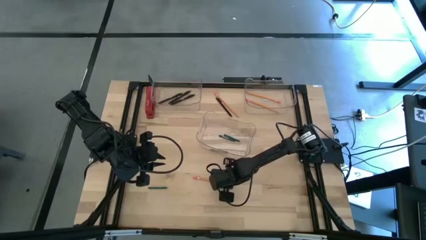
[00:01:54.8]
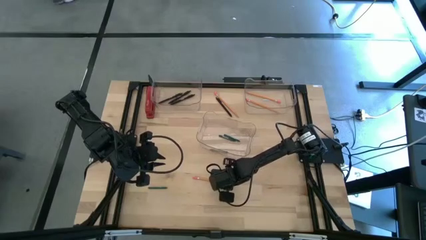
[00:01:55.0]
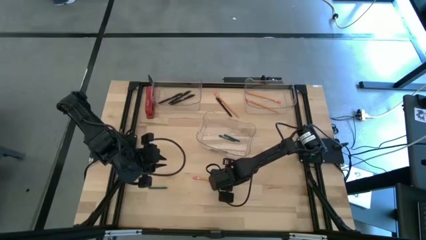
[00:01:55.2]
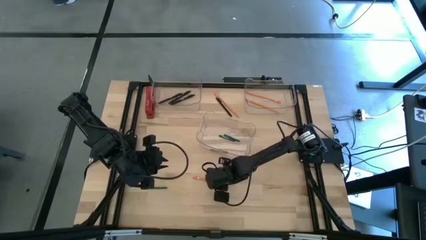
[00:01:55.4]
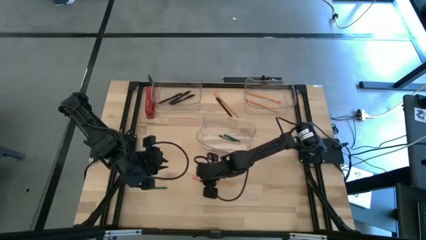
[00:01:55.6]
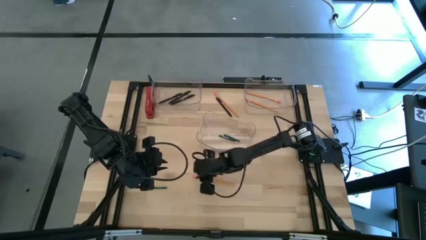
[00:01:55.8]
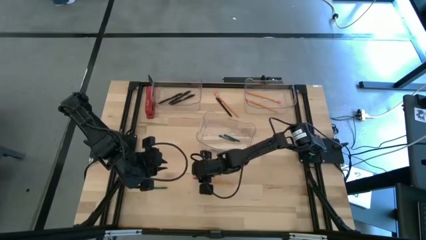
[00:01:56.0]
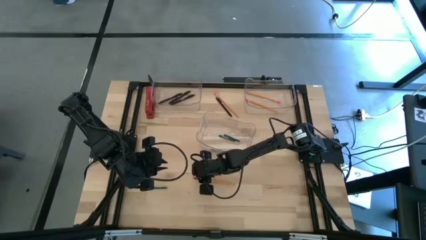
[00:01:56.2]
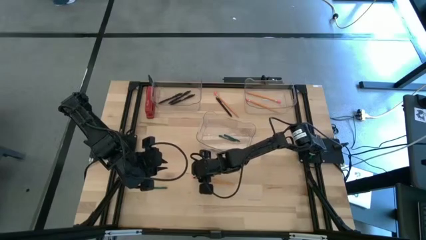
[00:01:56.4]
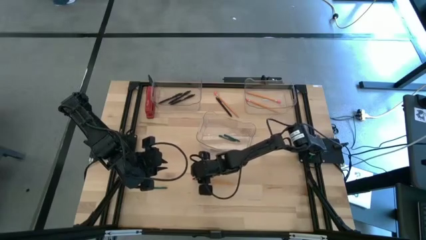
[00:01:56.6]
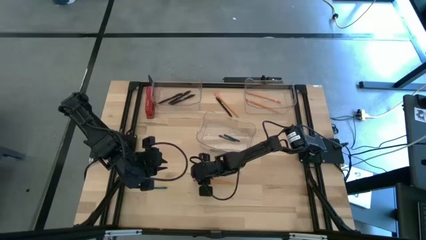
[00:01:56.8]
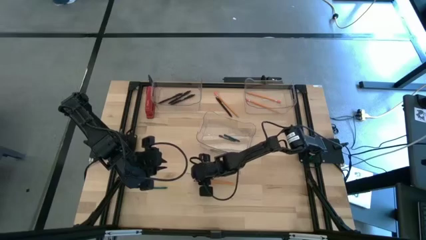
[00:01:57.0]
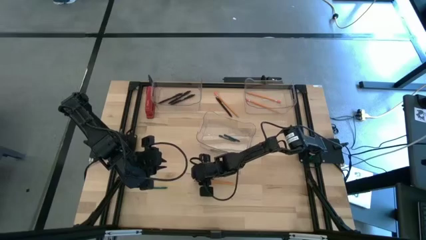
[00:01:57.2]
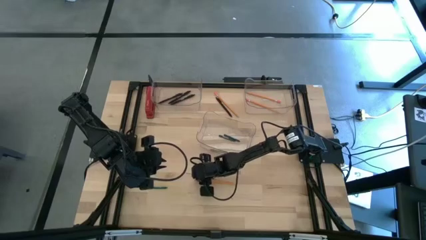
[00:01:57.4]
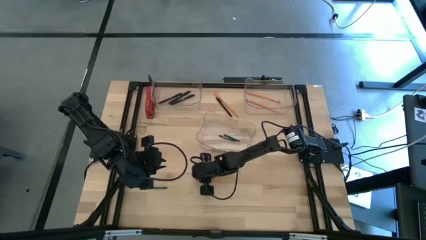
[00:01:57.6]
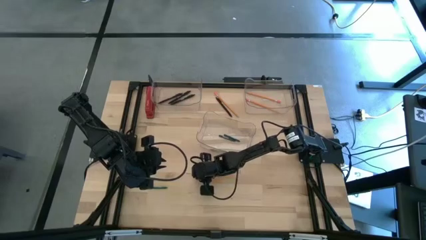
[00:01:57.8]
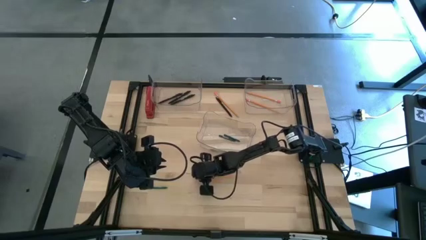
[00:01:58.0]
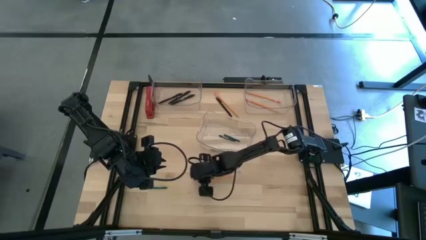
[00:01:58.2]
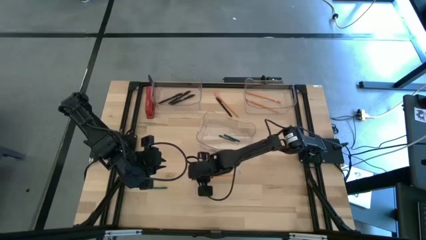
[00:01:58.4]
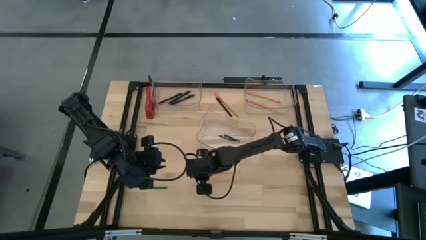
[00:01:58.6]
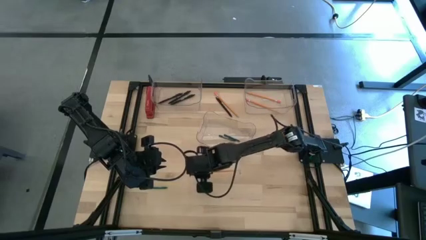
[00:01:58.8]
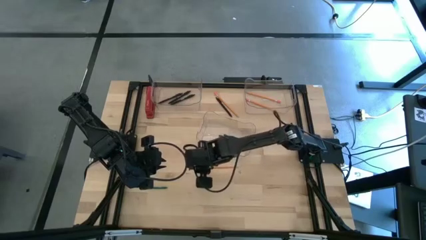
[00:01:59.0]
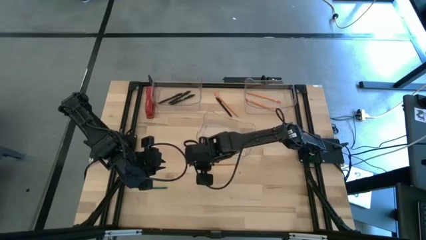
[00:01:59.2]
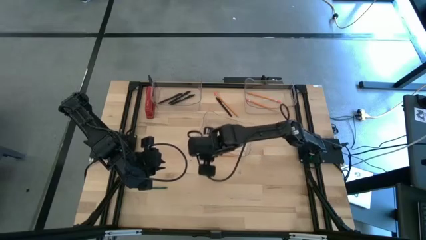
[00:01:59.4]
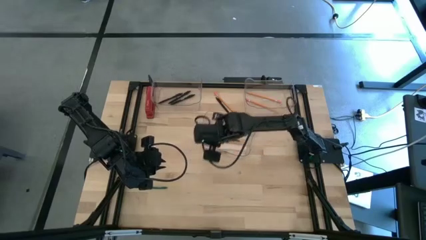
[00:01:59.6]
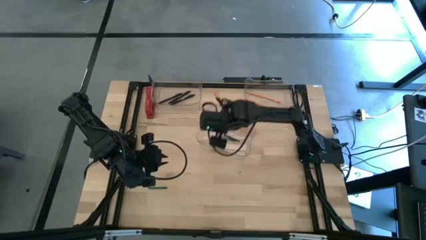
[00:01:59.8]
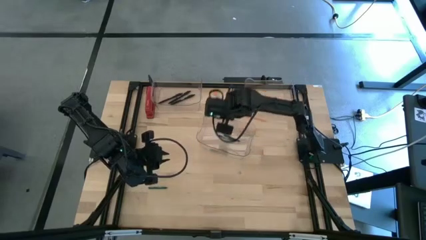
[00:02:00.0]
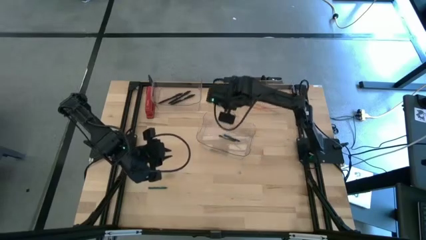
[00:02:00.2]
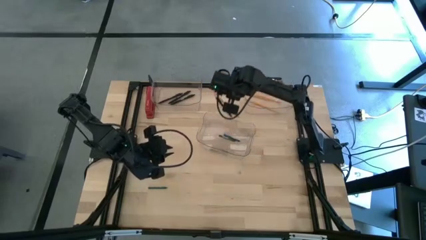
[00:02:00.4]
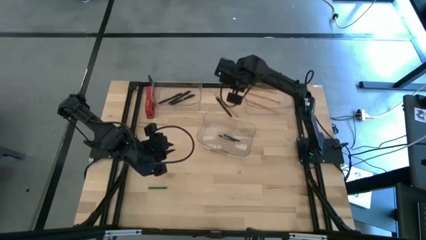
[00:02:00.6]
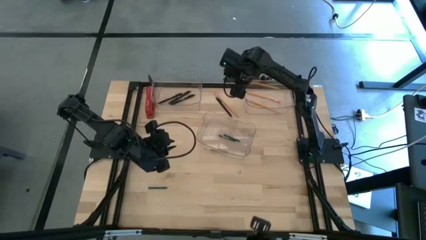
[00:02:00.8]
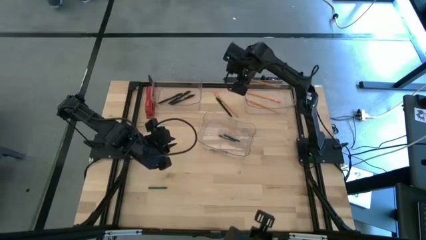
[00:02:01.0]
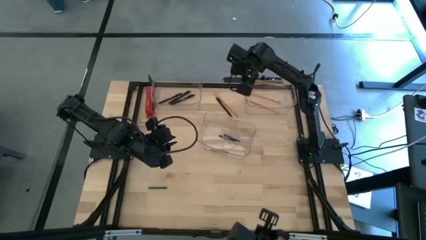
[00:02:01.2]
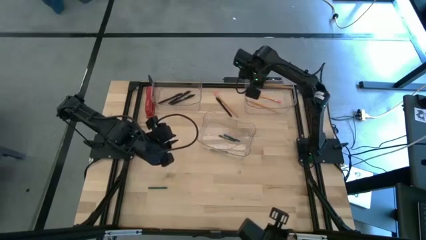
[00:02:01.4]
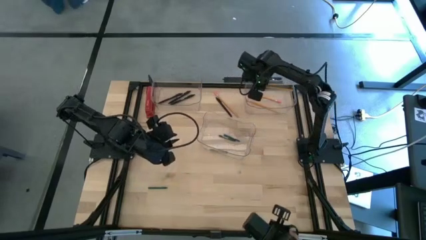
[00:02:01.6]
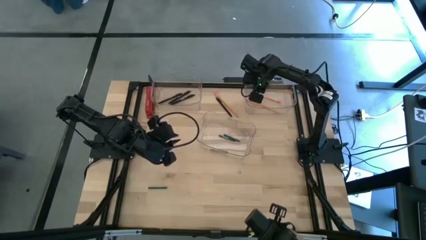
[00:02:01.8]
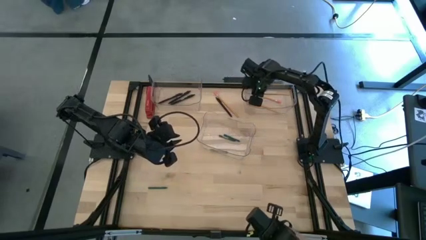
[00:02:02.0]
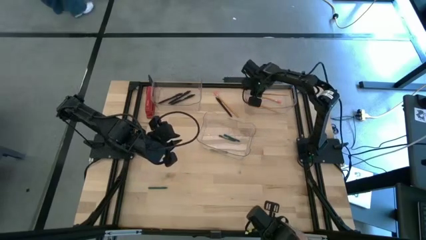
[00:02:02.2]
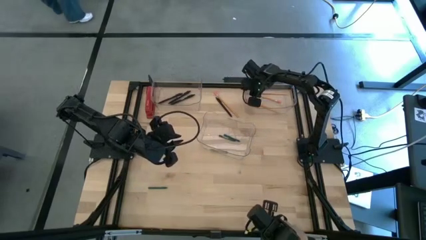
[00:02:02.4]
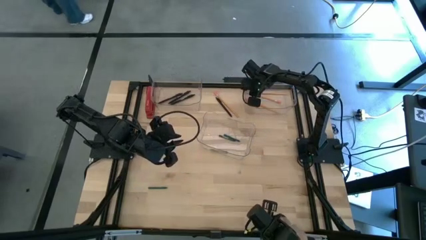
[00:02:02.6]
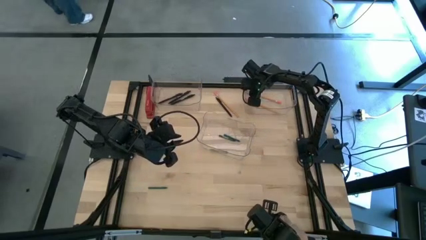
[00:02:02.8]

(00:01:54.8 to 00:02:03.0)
Task: Sort crayons/erasers/pens/pencils in bins
Put the orange pencil into the top right transparent bin

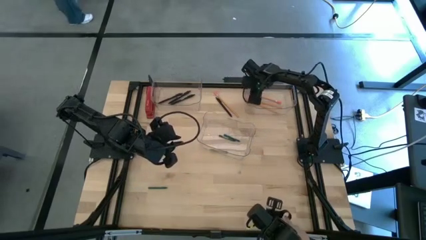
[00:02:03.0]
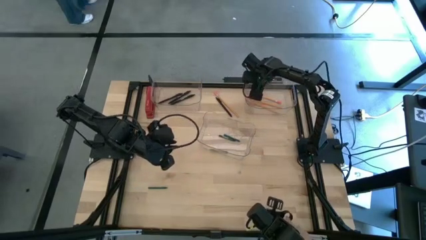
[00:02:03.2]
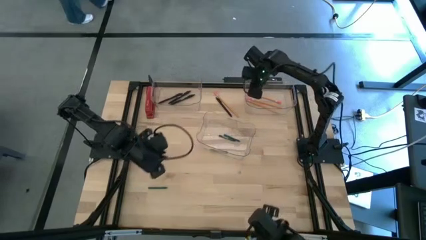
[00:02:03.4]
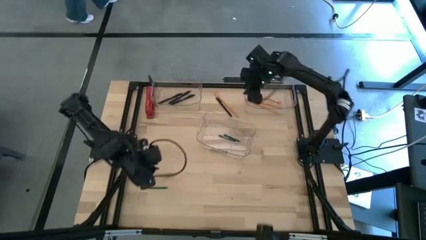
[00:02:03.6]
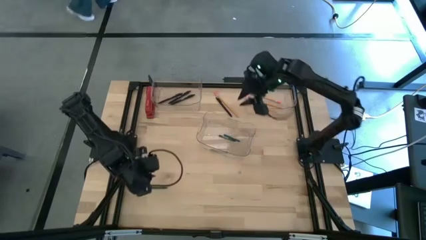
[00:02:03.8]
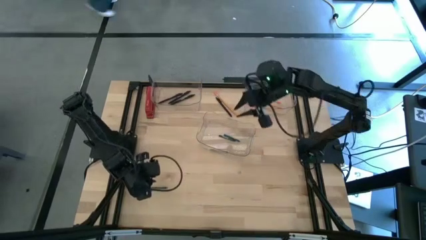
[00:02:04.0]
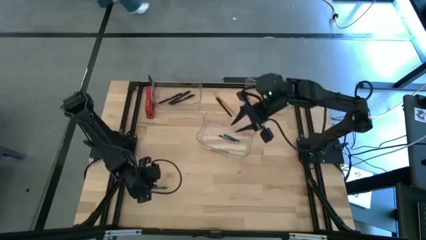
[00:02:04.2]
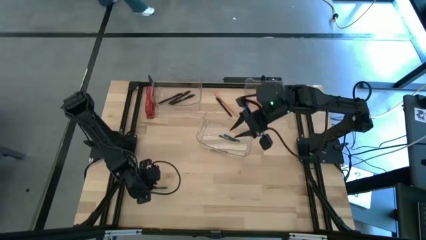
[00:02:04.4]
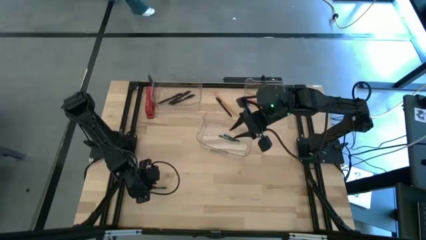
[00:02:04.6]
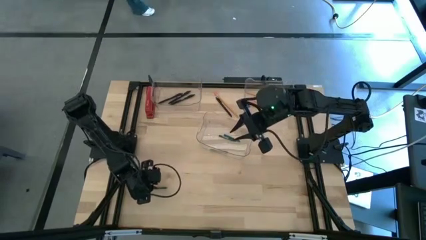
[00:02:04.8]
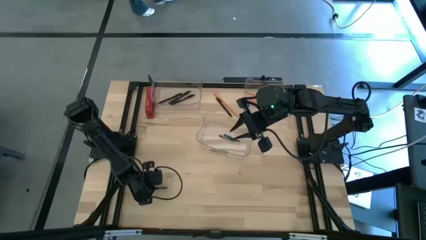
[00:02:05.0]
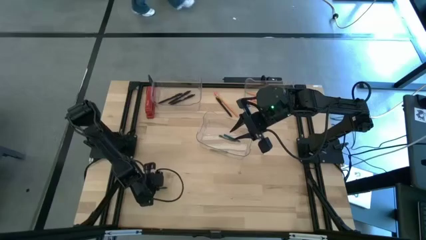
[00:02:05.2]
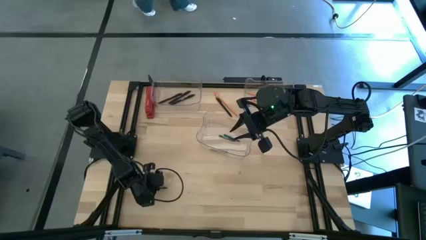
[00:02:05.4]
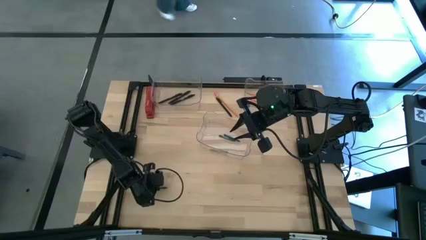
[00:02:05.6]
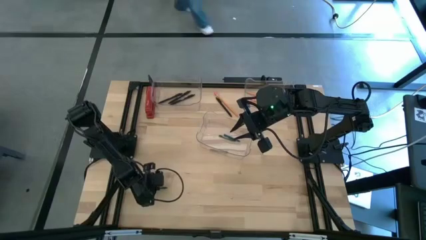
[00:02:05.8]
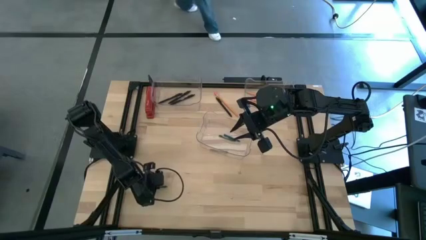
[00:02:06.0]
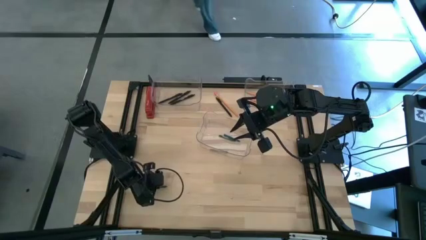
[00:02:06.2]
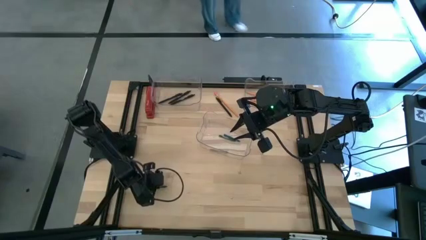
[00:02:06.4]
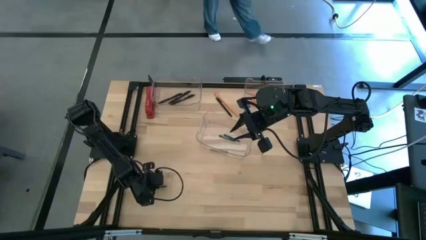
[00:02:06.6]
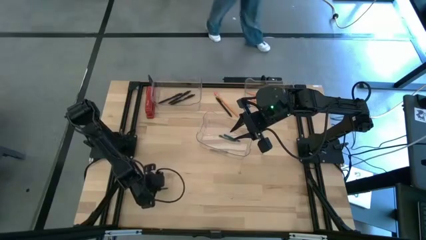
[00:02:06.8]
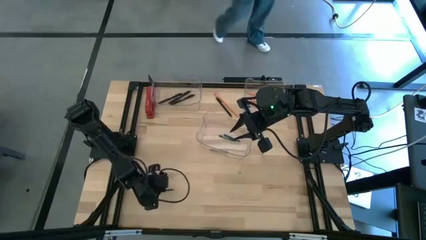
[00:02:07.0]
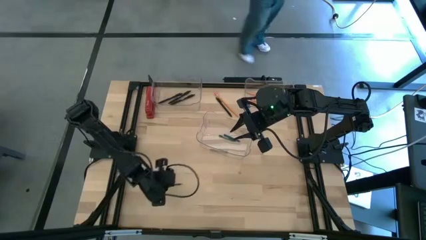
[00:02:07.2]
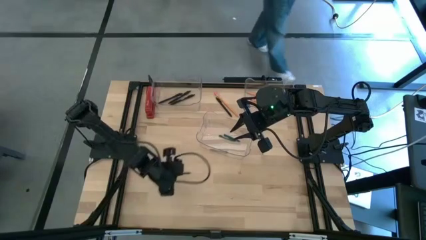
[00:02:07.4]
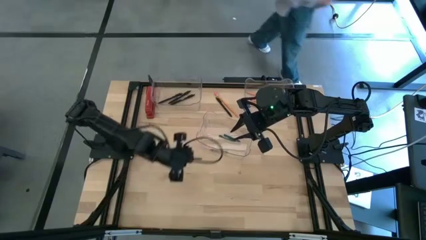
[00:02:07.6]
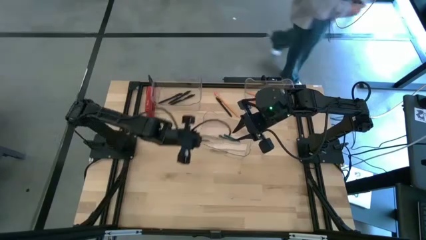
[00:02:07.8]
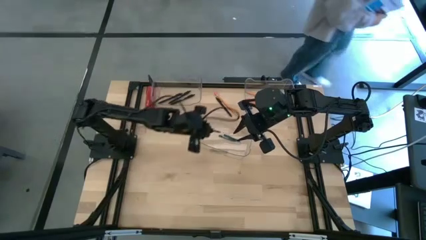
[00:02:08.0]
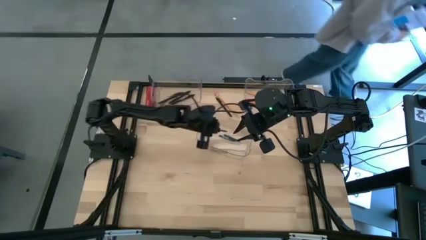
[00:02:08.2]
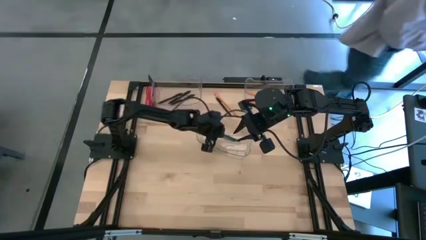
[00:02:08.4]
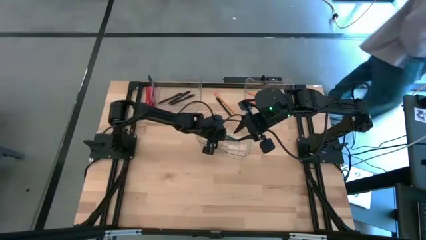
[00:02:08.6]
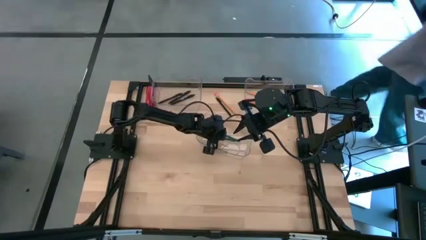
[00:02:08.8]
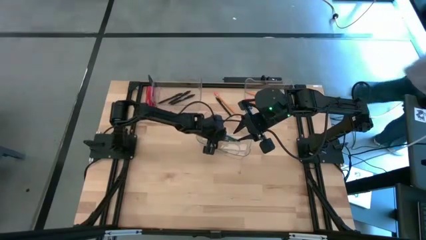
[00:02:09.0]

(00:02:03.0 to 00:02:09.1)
Put the green crayon into the middle transparent bin

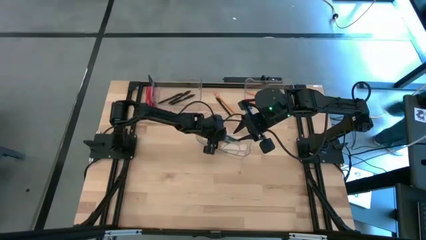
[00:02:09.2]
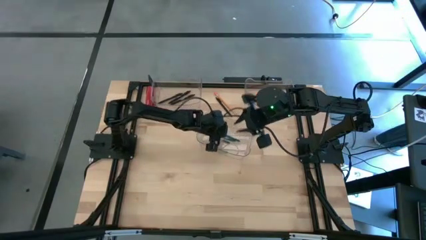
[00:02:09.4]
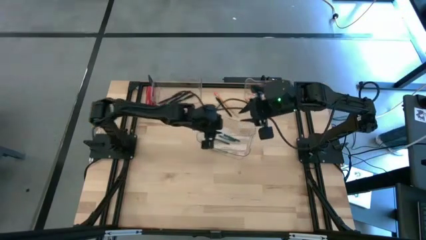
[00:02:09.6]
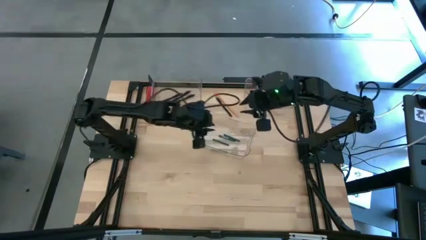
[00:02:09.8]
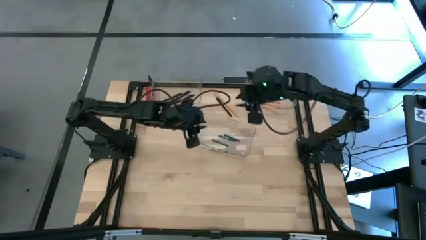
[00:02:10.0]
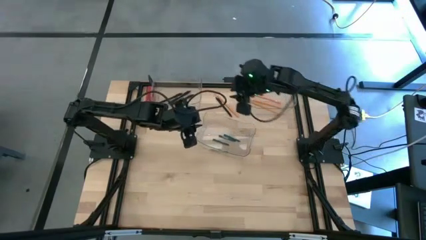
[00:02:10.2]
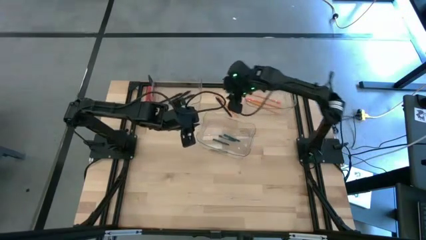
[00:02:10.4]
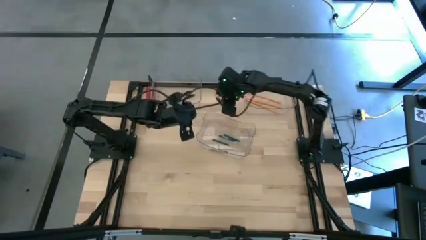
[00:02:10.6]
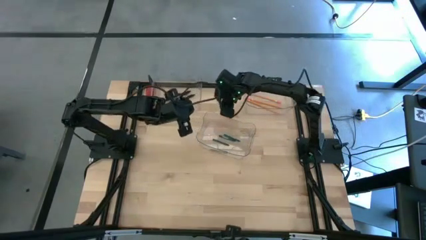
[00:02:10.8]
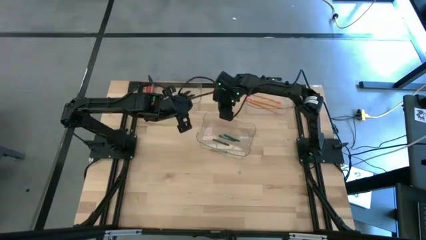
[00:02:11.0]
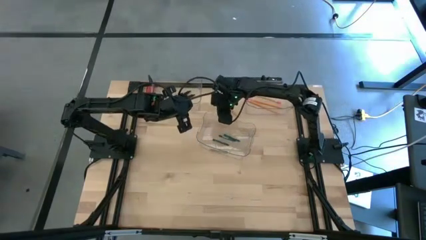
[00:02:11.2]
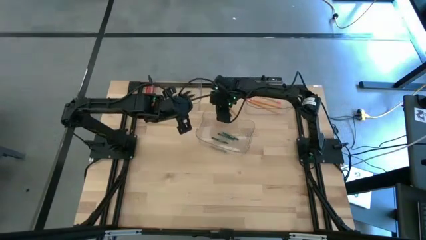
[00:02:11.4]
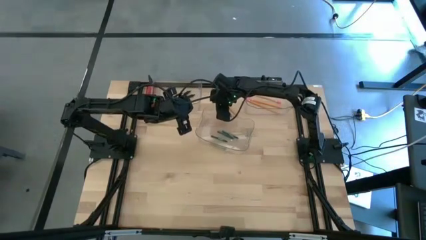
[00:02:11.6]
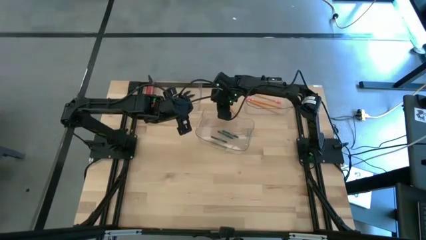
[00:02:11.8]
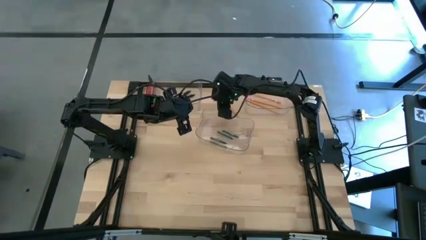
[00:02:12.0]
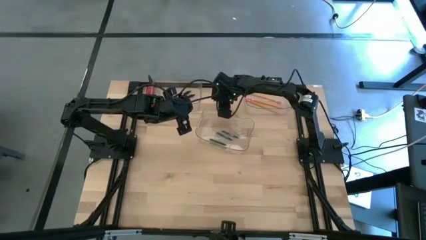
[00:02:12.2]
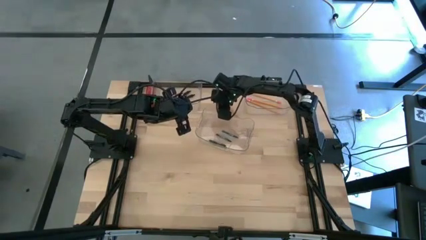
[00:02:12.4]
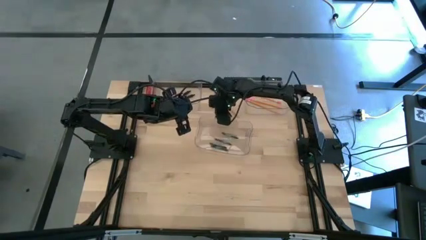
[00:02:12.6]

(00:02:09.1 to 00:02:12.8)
Adjust the middle transparent bin
